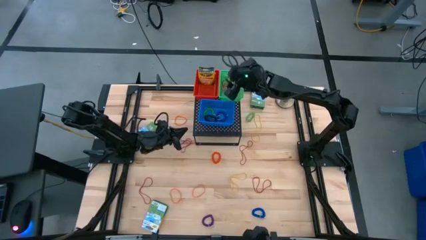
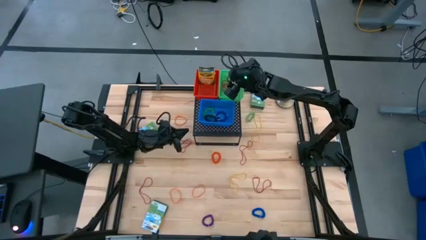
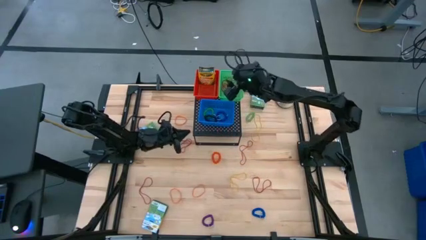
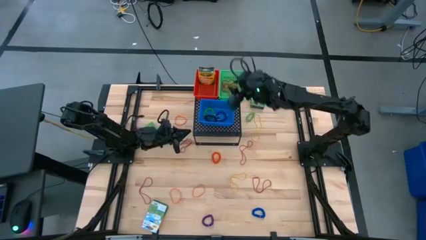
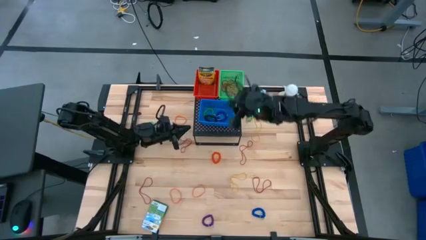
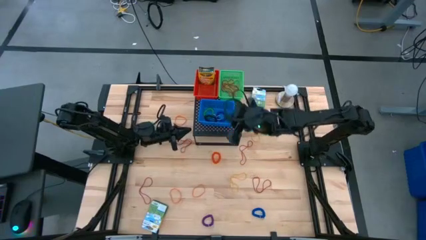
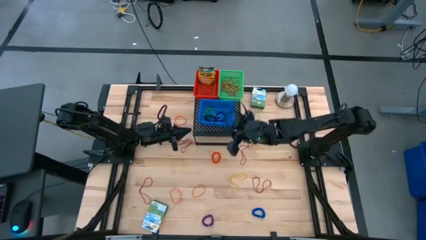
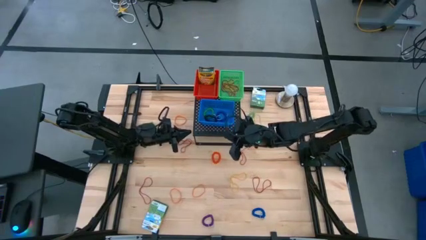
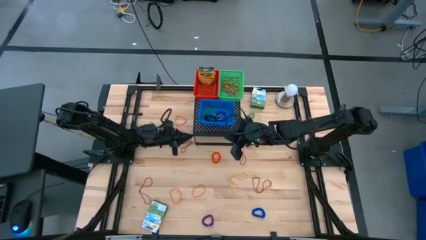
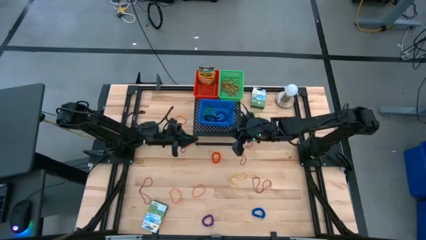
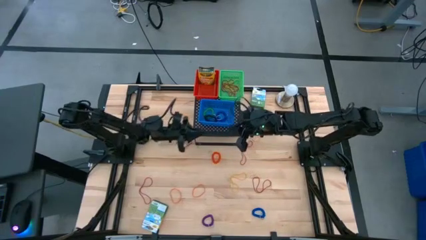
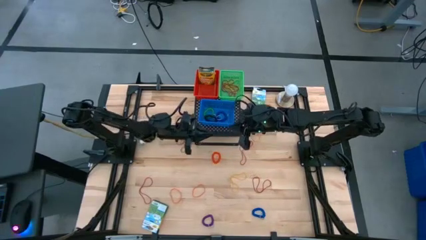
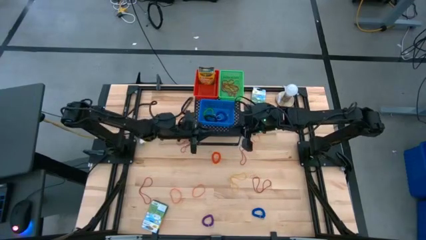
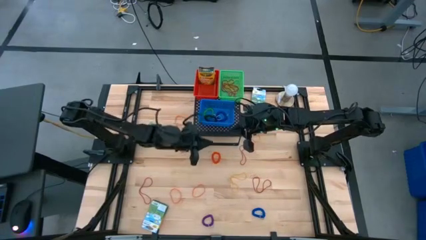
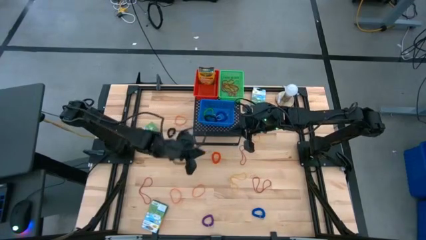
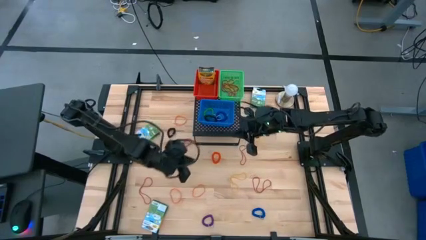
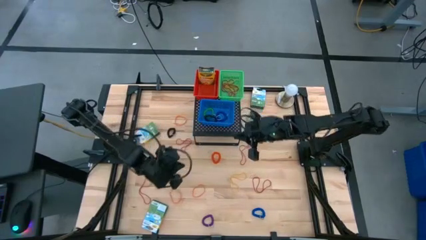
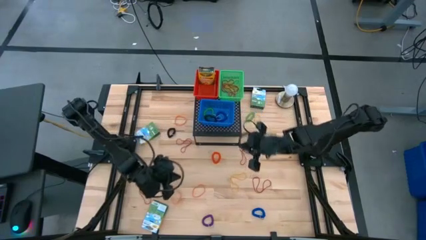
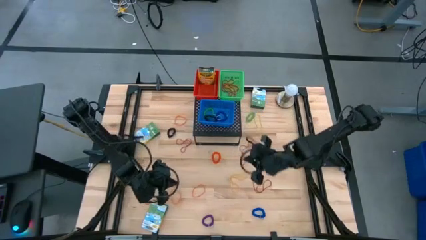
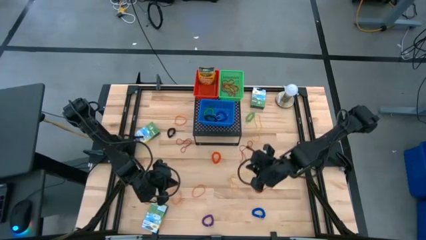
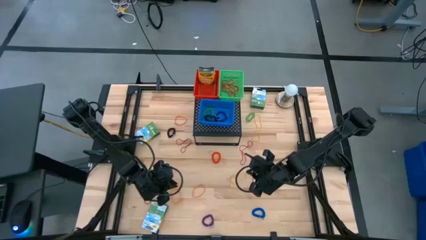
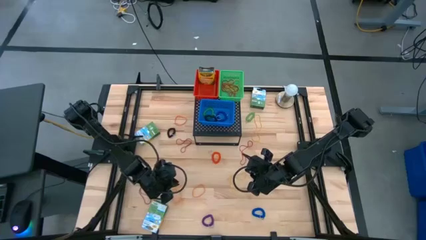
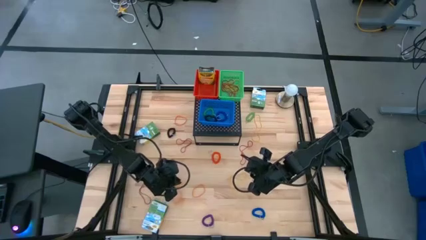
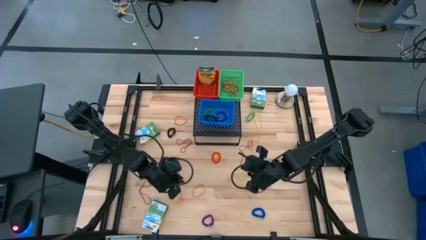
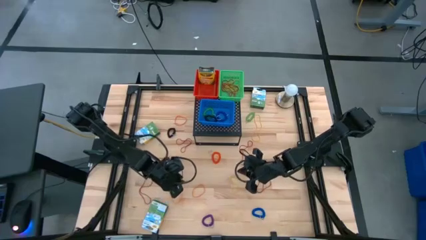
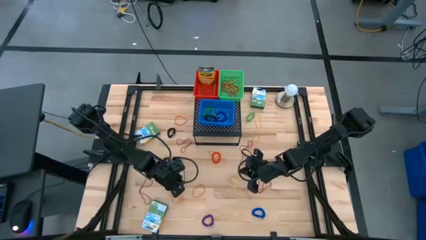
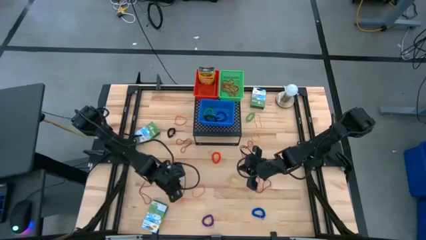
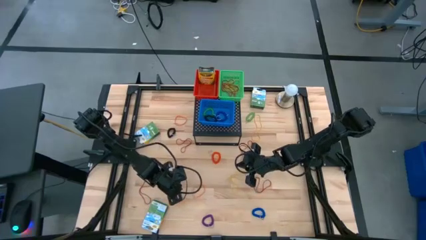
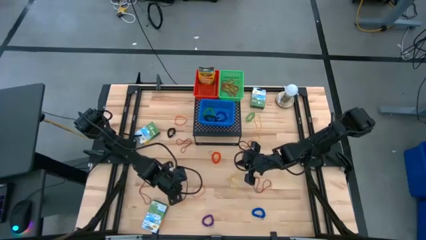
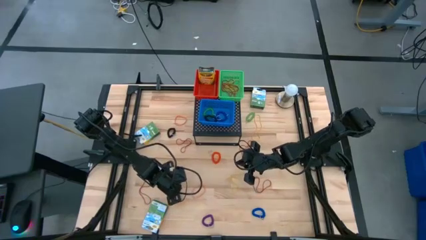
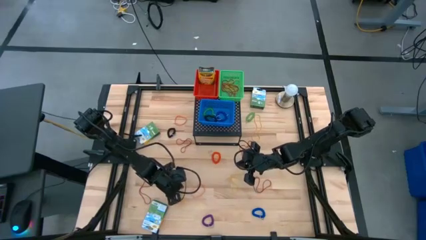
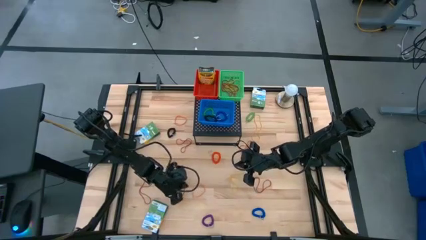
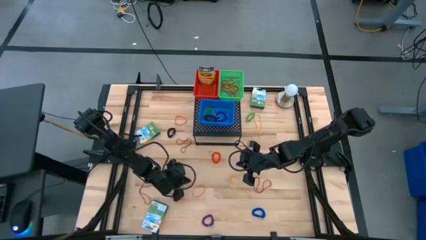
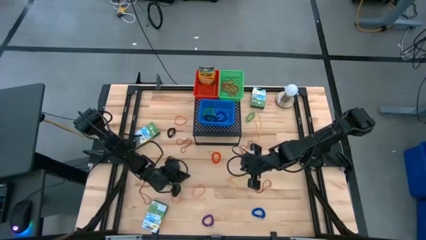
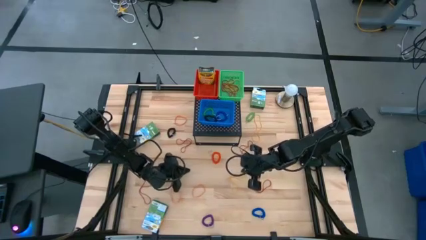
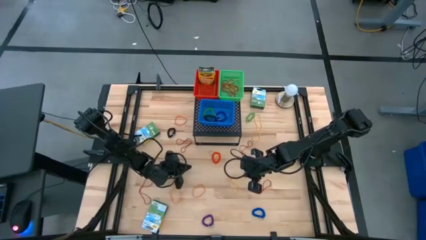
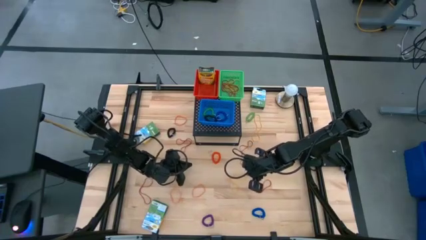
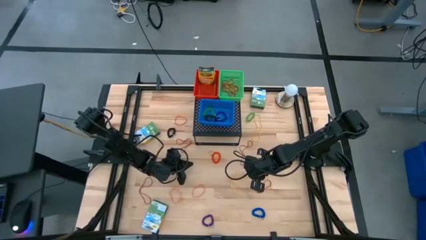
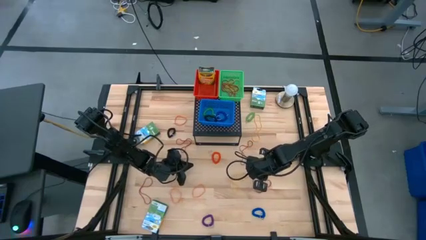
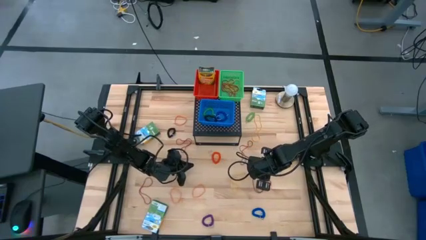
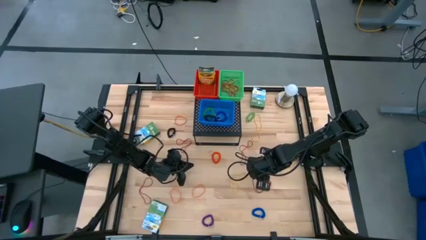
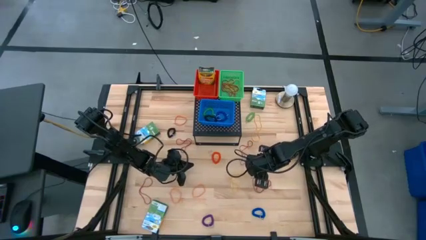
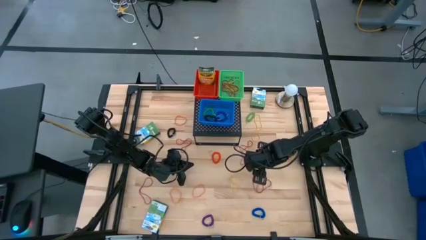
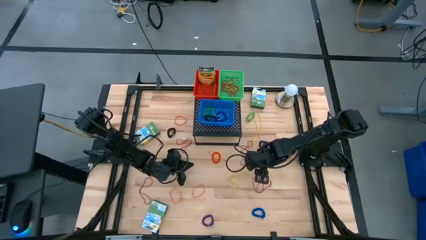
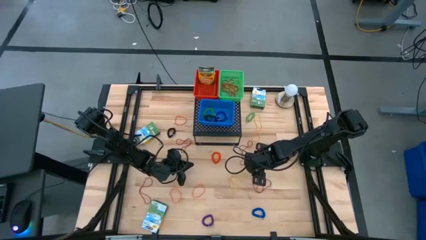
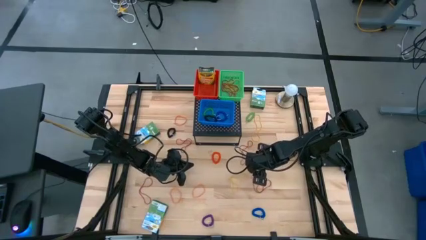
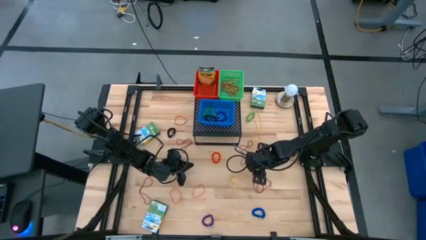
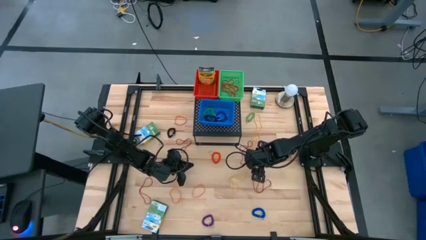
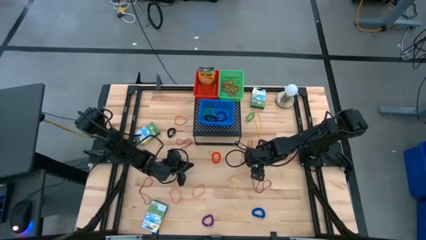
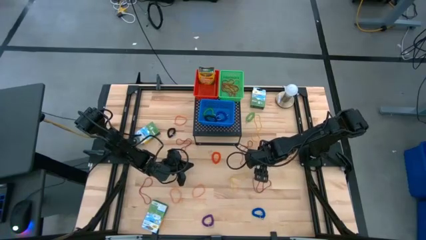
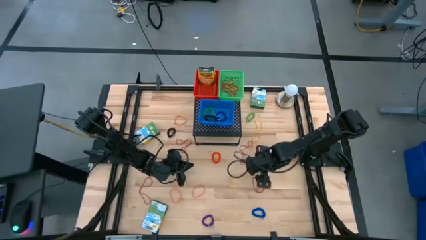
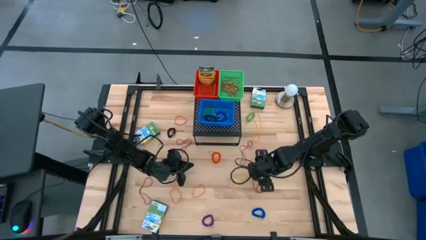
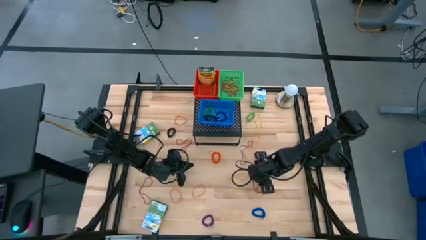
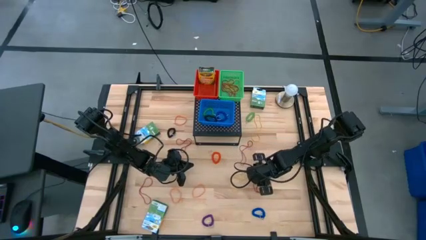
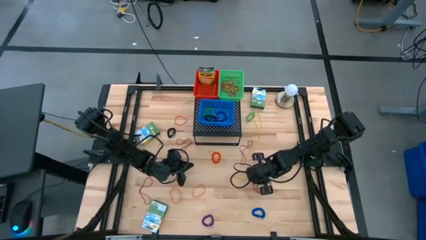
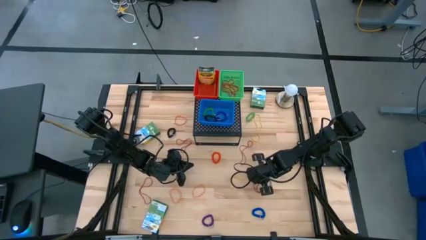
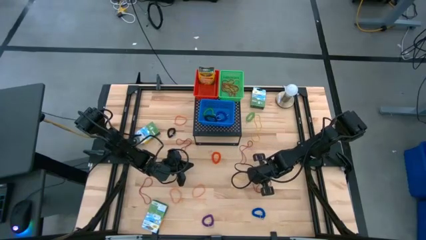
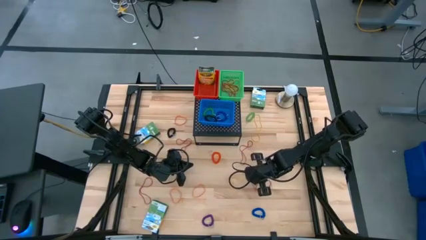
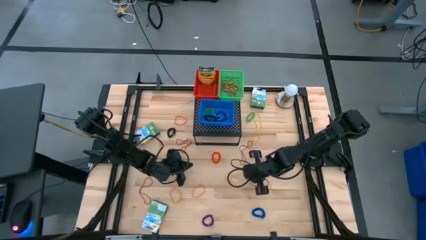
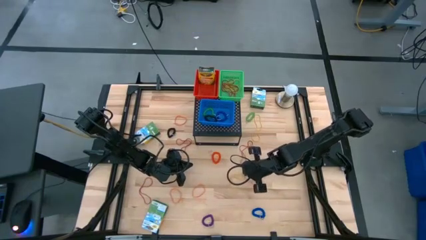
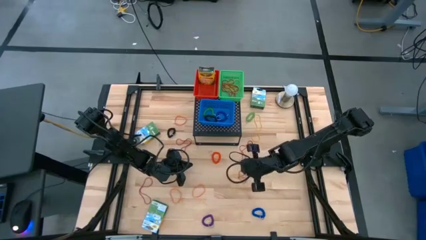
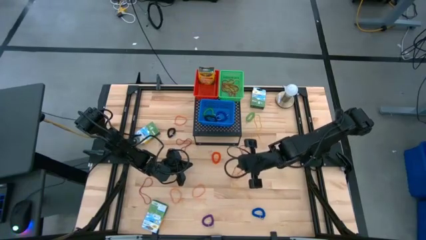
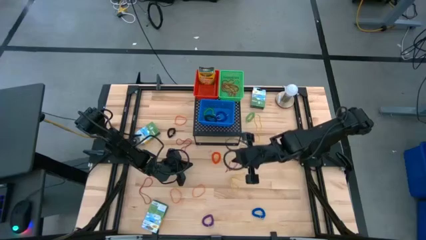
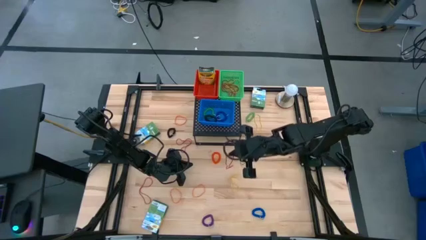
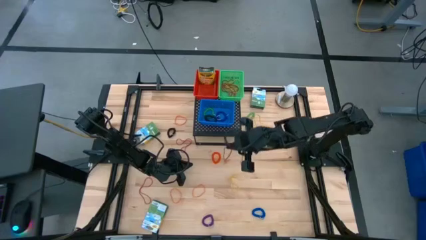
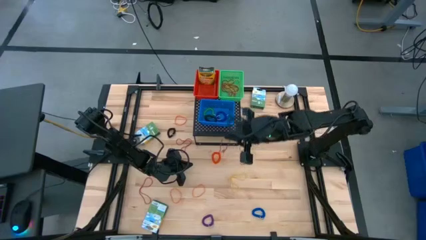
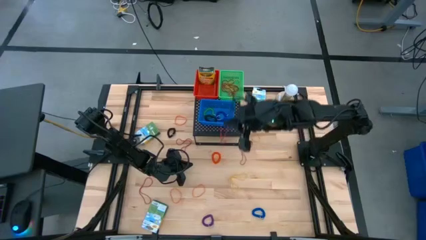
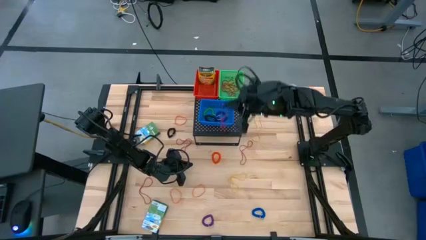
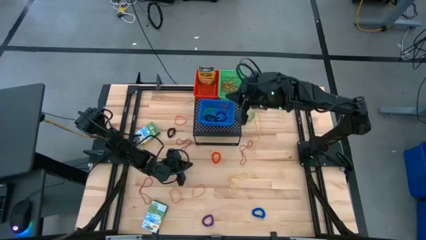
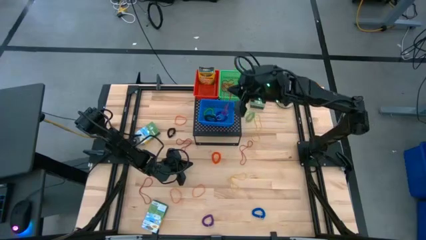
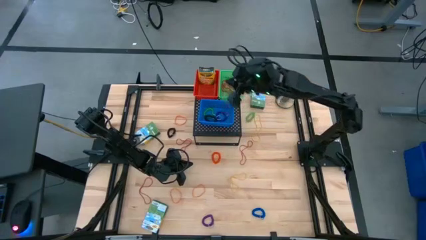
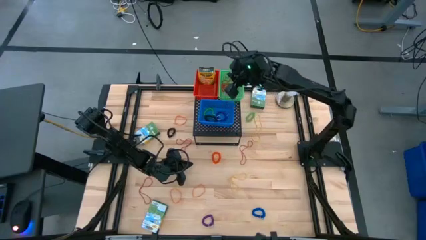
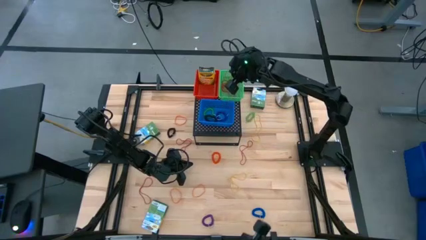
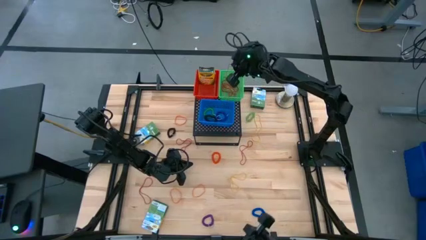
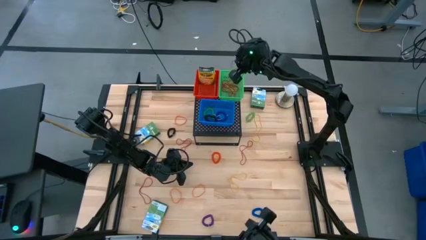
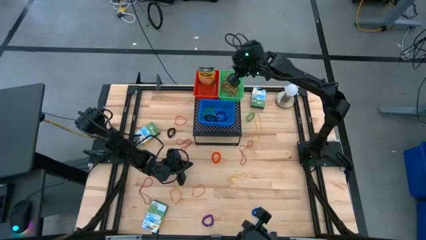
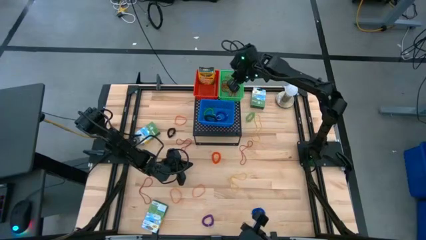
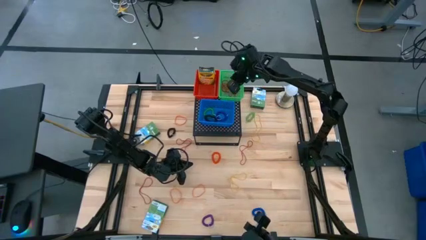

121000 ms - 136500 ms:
Task: Pick & Place Office Desk Supplies
Put the red rubber band into the green bin on the shelf

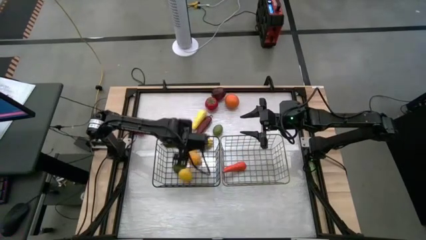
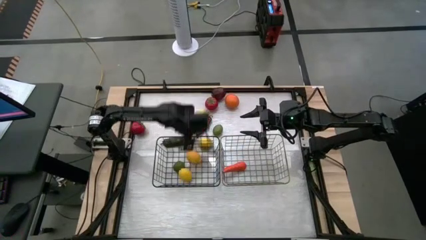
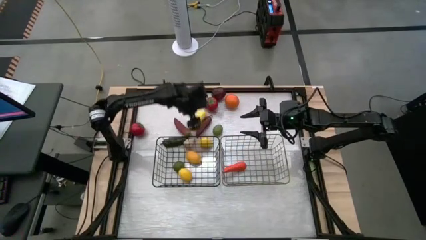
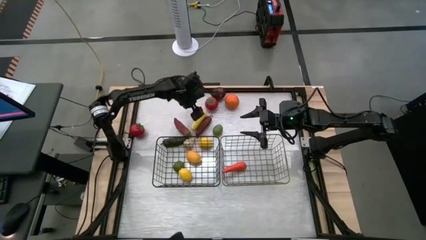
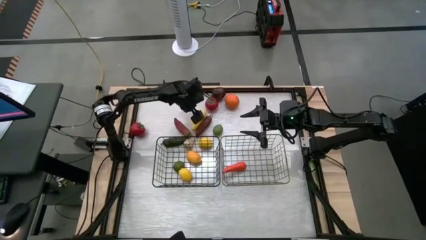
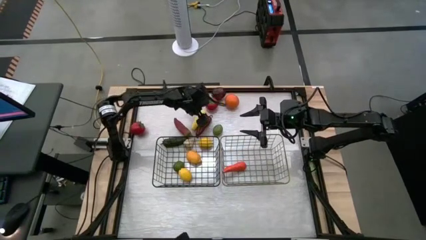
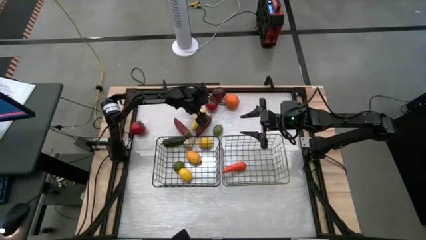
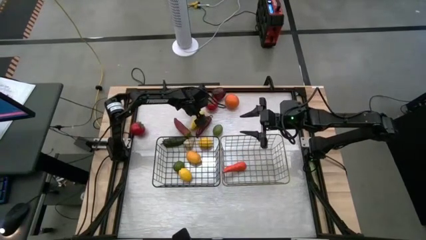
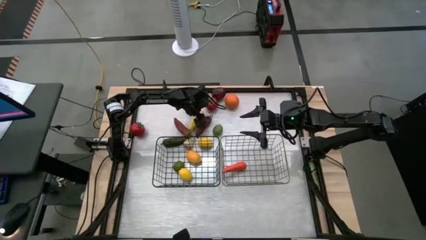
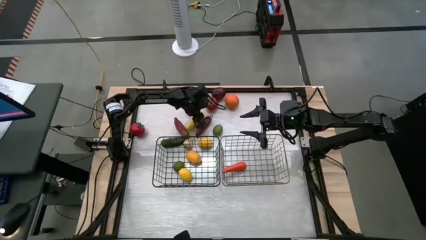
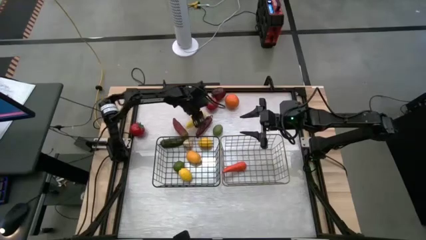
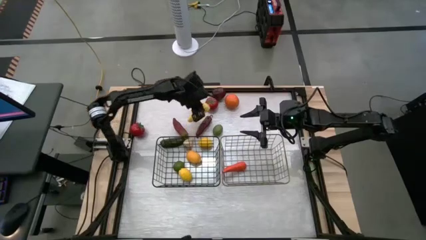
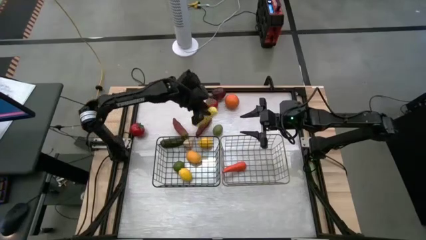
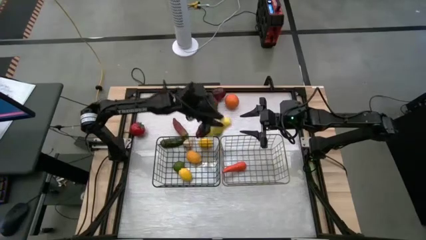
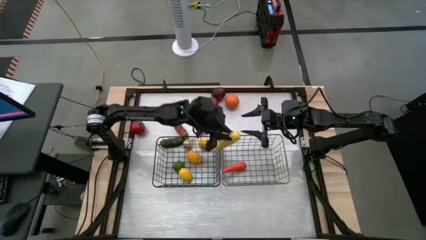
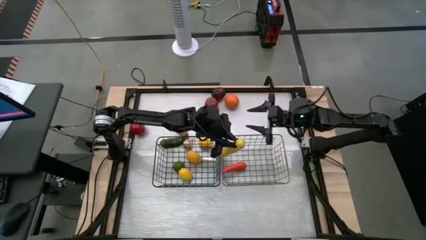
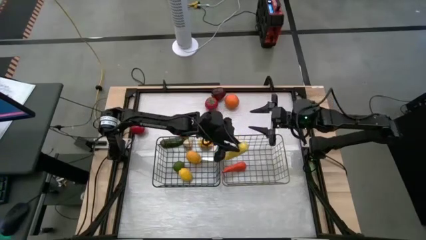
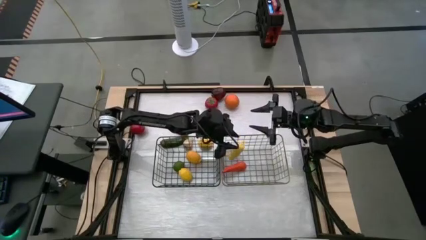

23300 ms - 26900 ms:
Task: Sort produce into baskets
Put the yellow corn into the gold wire basket
